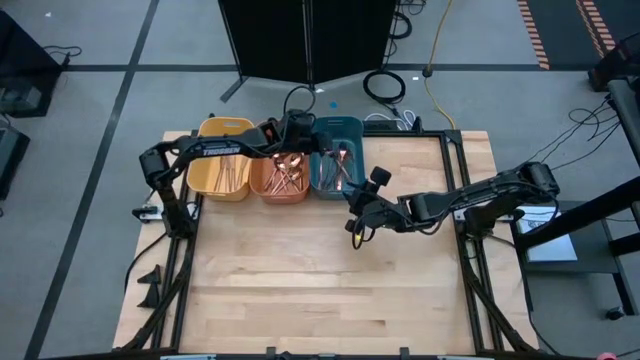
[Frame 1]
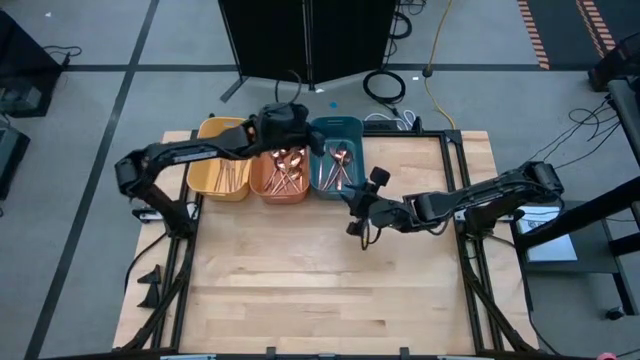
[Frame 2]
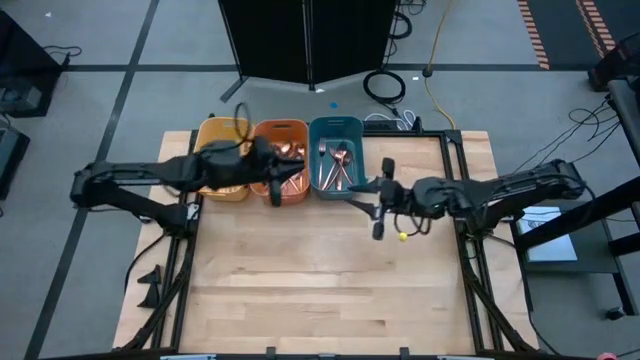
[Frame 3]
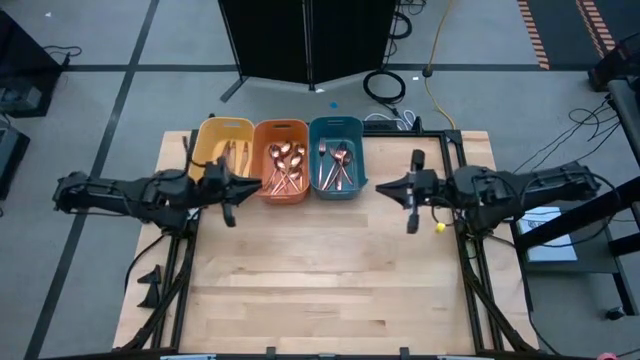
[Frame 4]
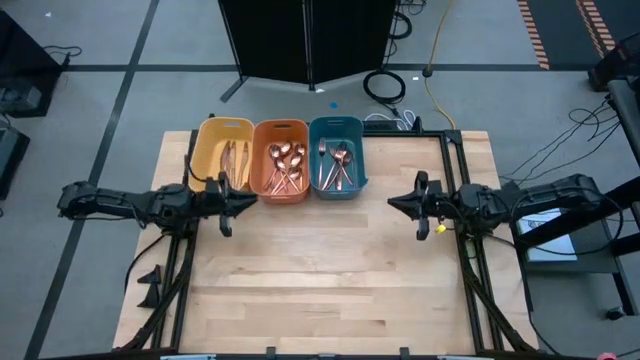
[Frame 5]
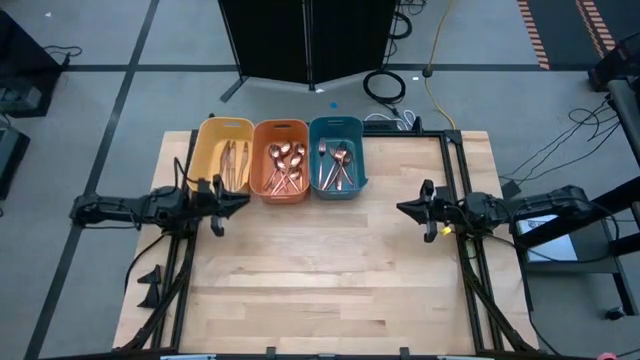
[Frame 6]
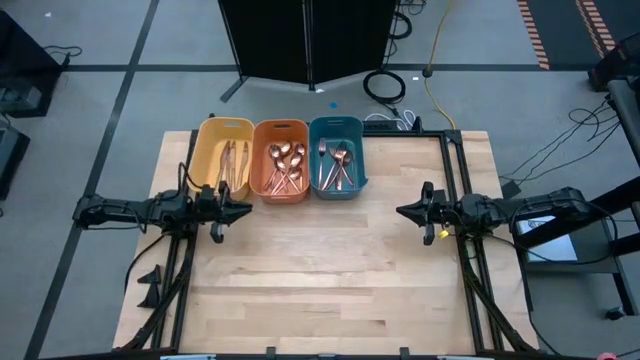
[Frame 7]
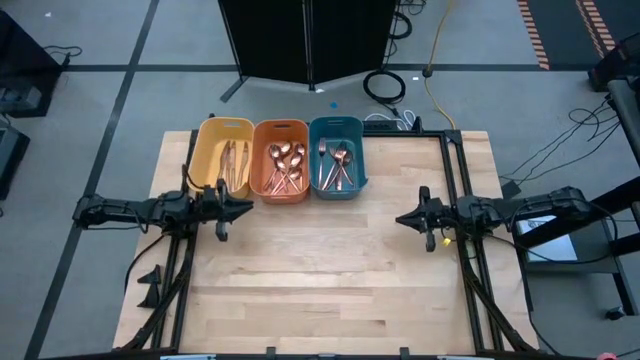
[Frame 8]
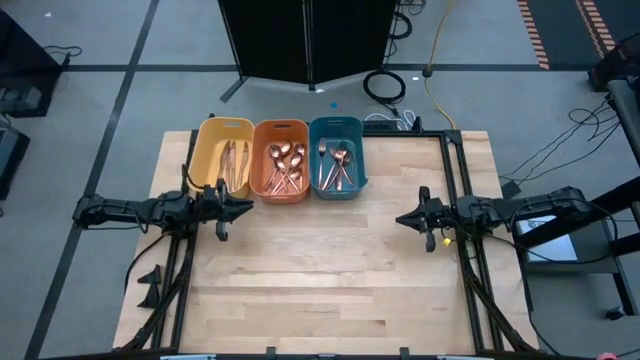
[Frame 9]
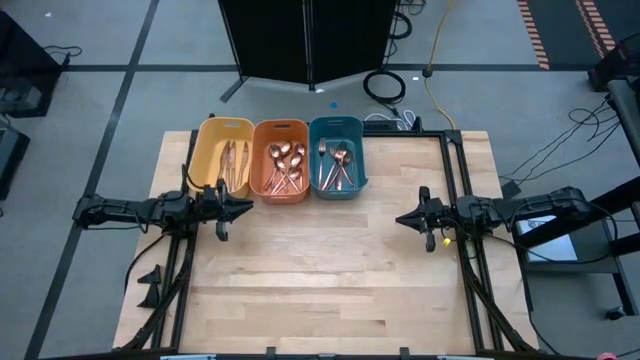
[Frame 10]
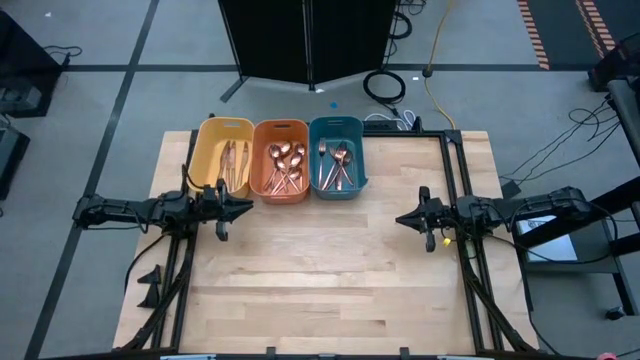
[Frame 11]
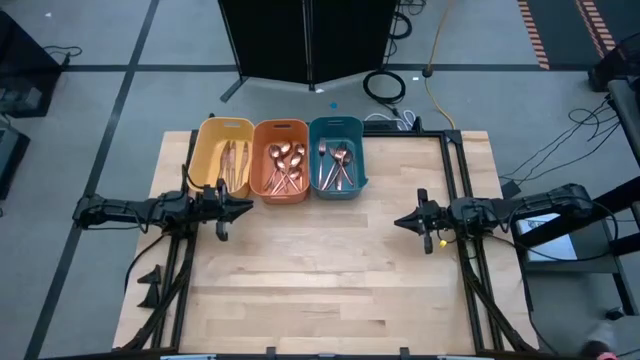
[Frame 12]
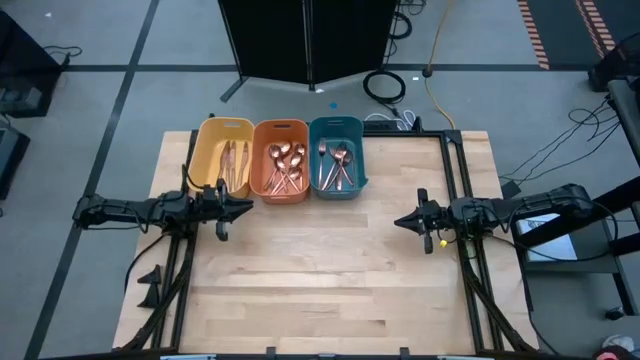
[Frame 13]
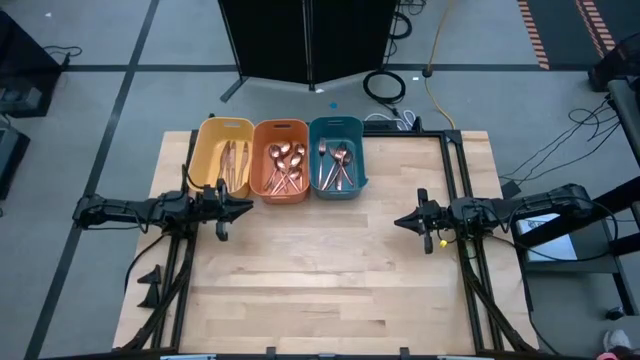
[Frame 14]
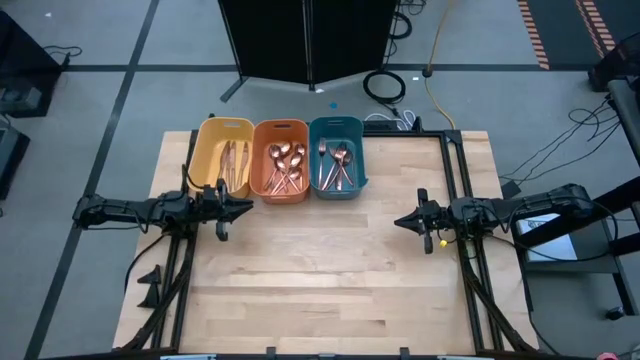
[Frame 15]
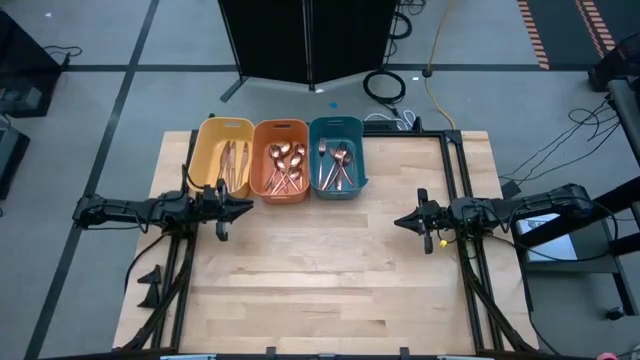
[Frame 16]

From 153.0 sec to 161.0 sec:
Task: Sort silverware
Return to Home Position

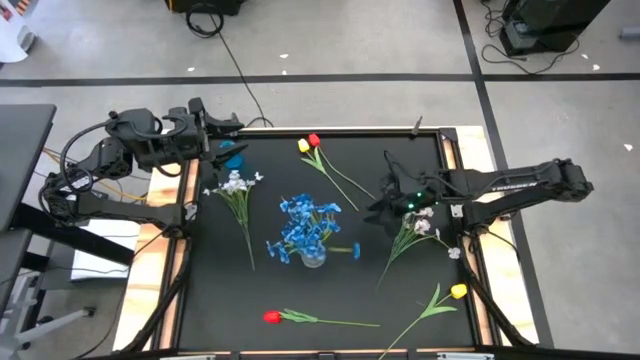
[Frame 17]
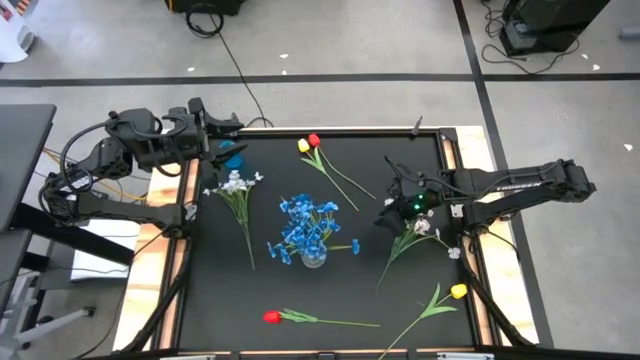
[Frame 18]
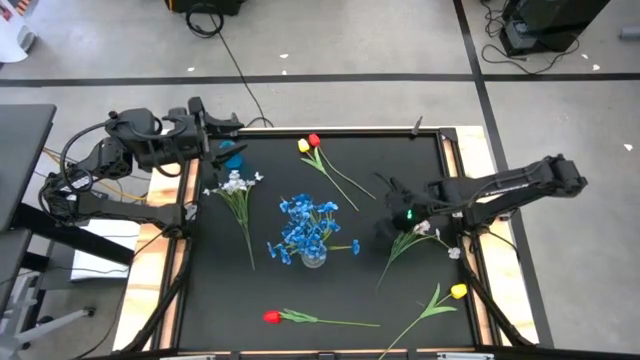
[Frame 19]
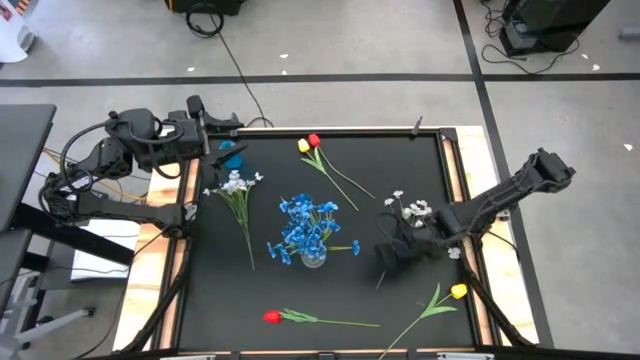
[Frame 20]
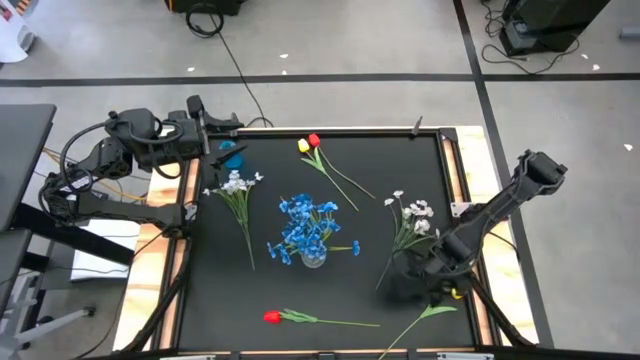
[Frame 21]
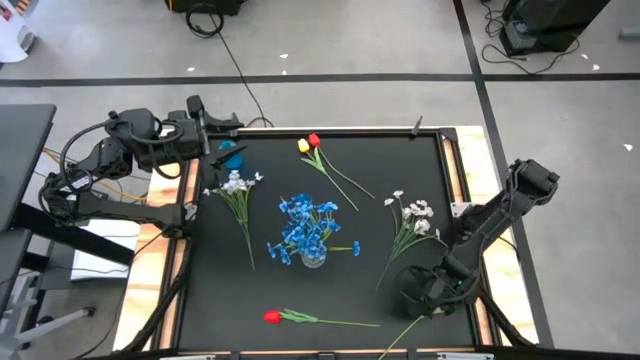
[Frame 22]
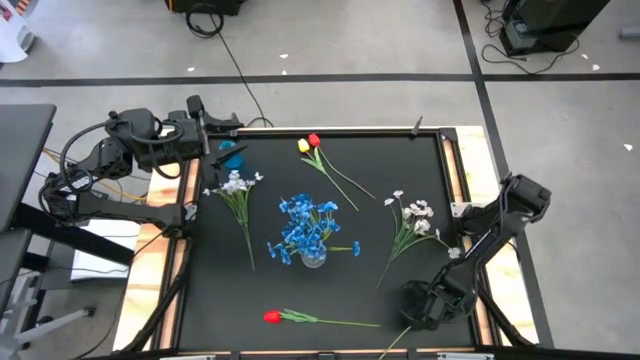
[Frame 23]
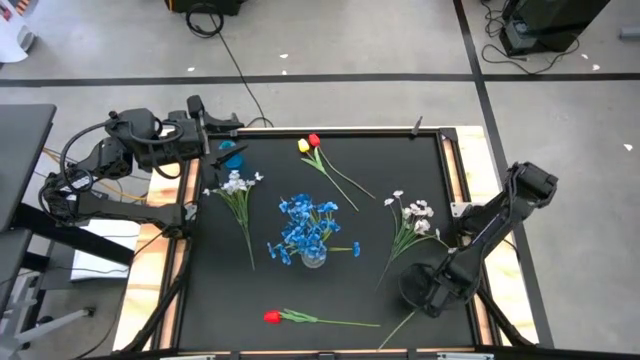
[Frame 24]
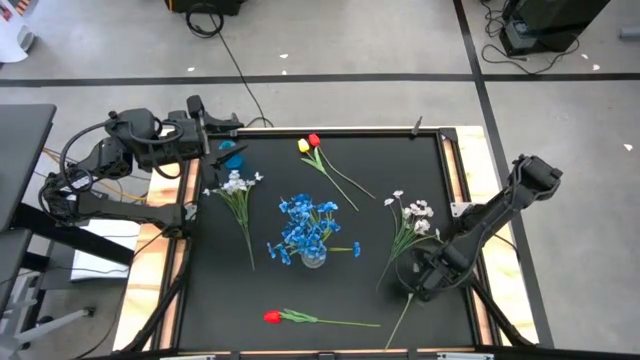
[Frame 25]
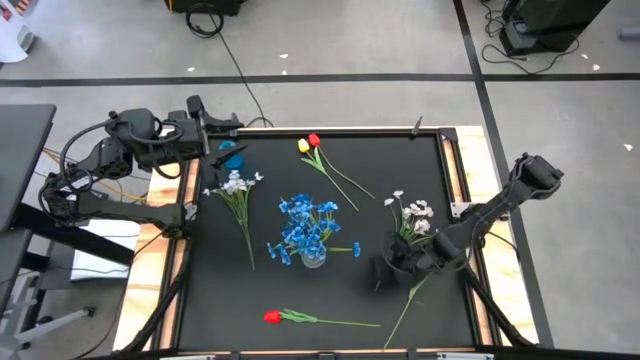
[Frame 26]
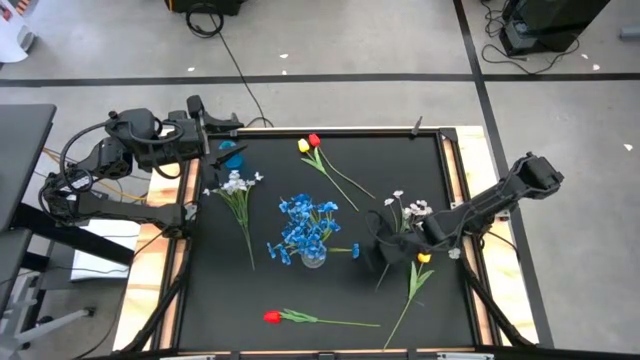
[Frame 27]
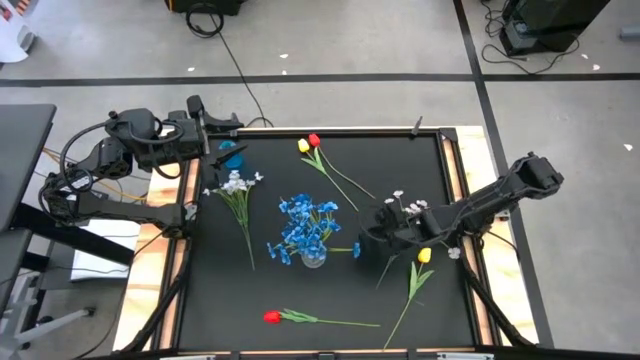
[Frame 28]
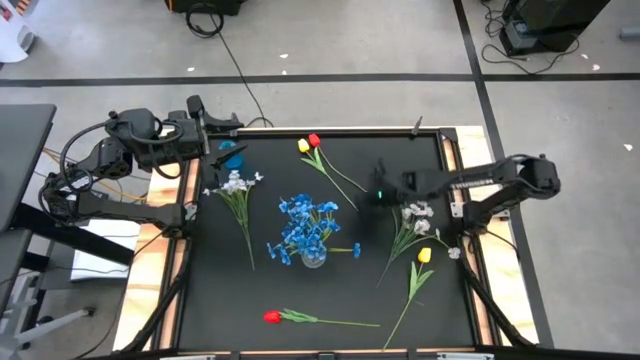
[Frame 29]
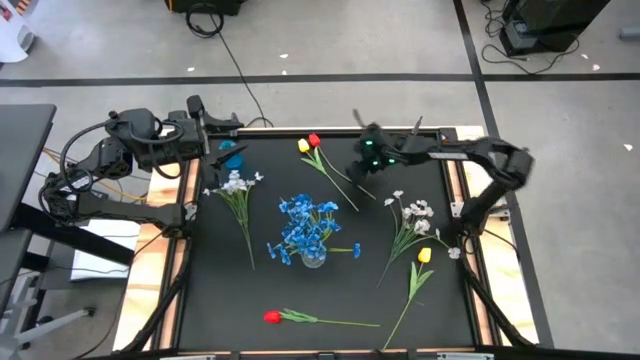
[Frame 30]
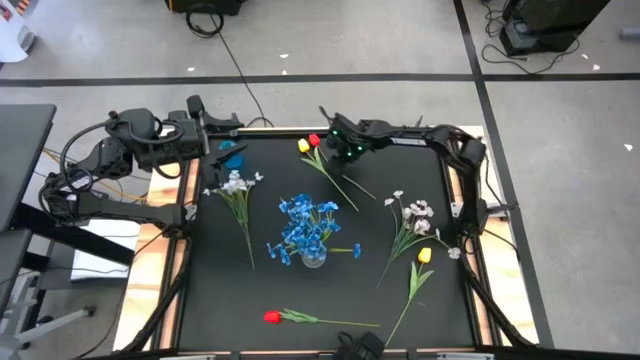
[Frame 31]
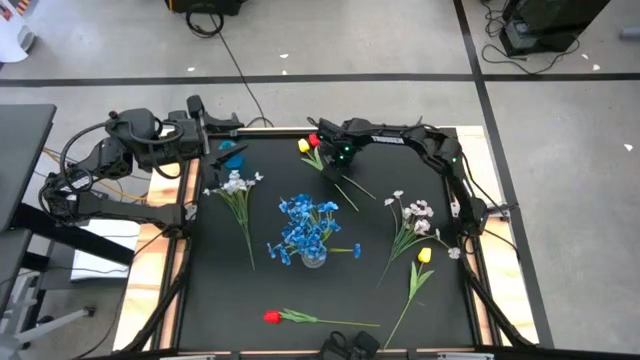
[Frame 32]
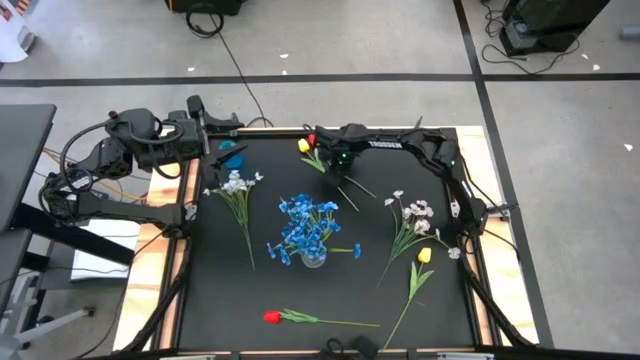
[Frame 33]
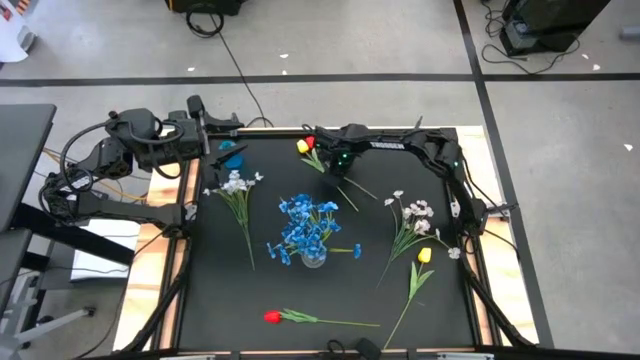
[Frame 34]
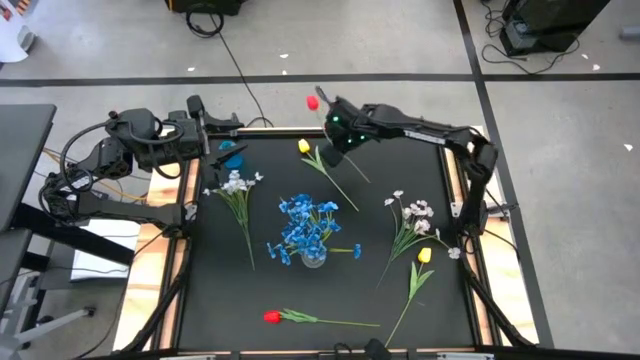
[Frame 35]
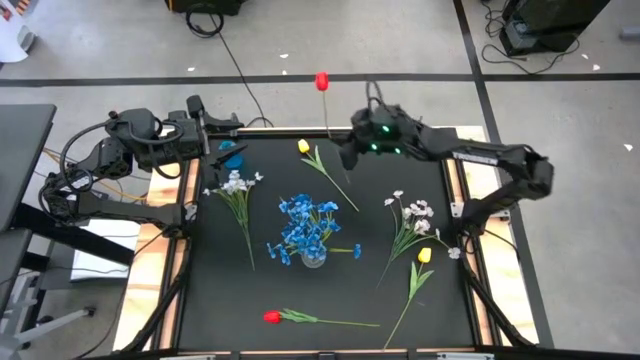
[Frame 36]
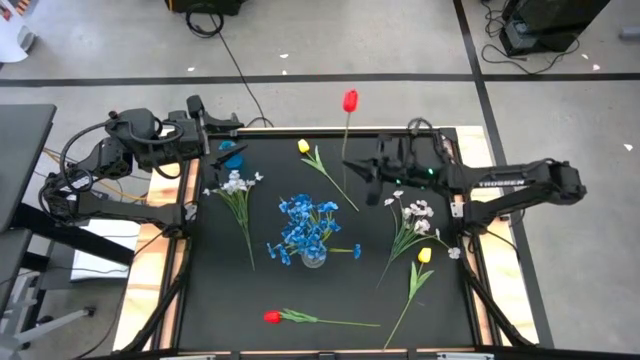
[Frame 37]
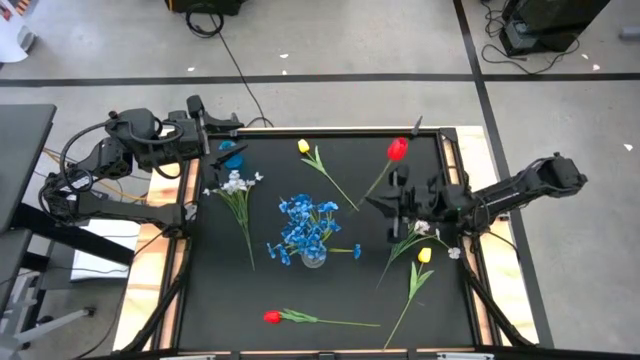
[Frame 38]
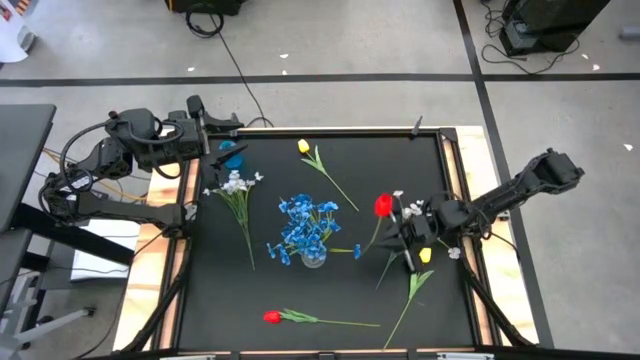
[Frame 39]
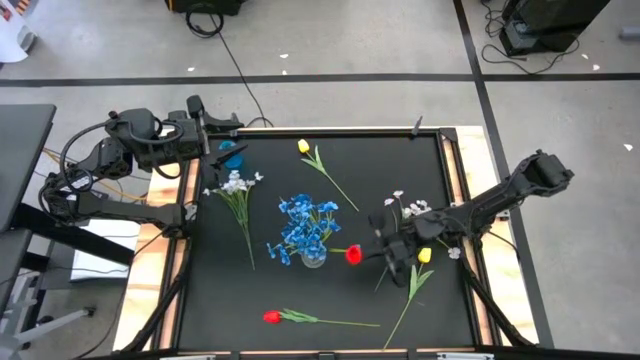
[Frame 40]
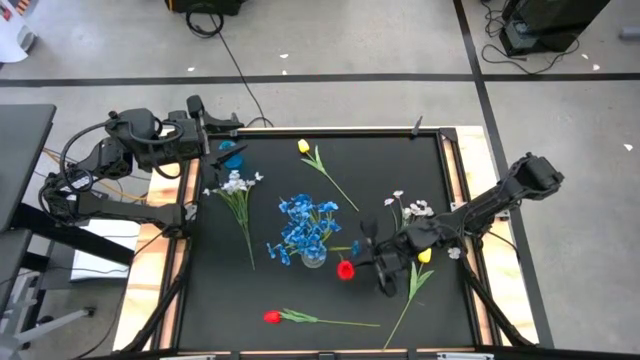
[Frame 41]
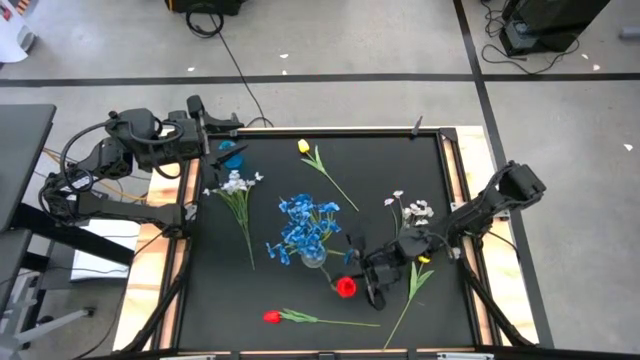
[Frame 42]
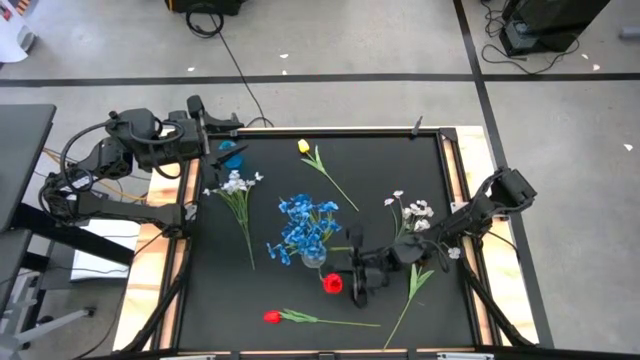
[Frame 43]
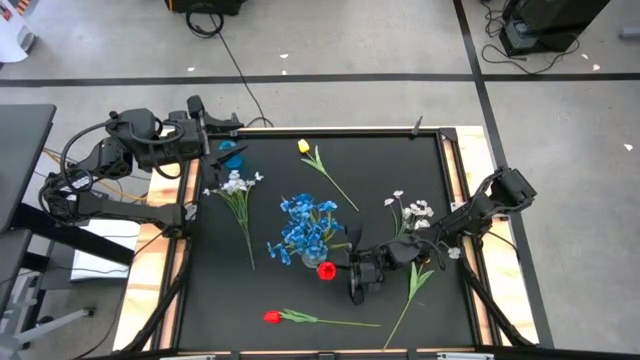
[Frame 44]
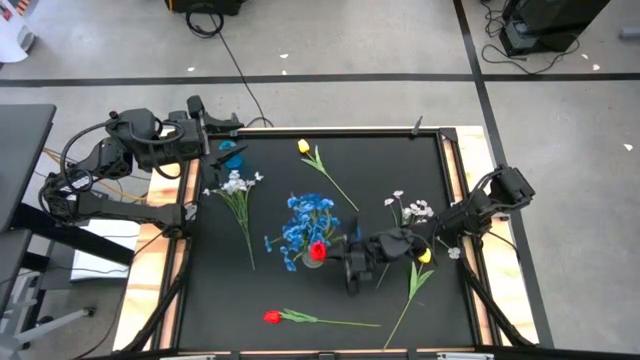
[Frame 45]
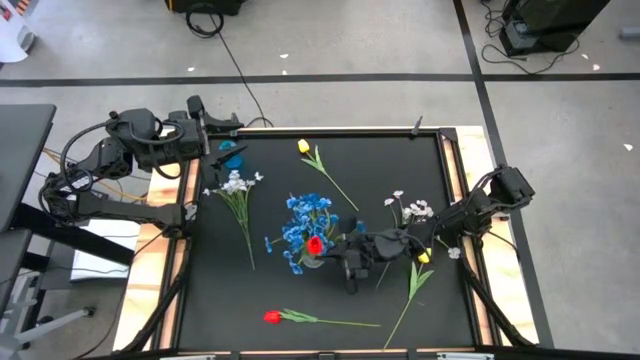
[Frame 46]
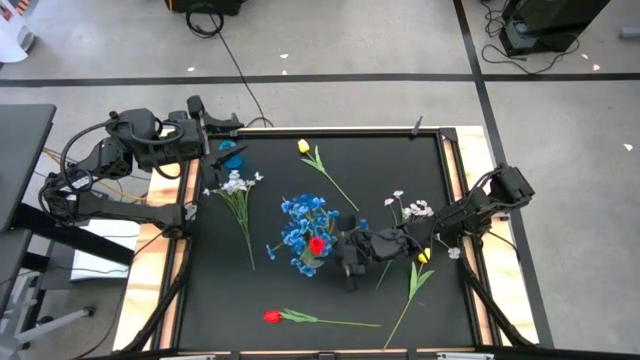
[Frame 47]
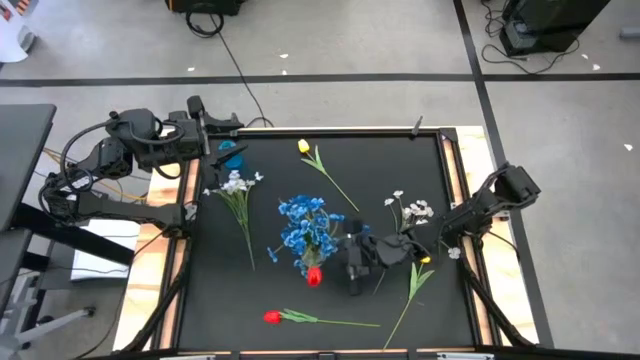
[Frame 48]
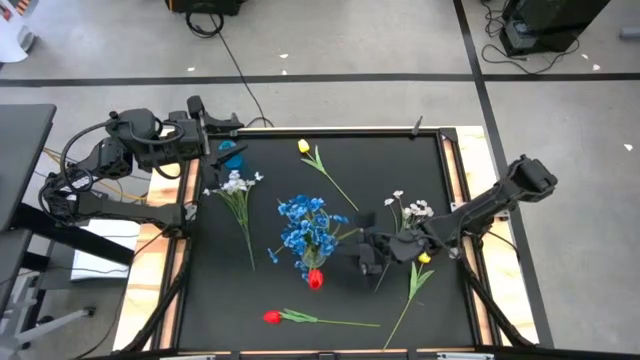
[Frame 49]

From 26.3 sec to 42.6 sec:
Task: Sort flowers into vase by color
Put the top red flower into the transparent vase
